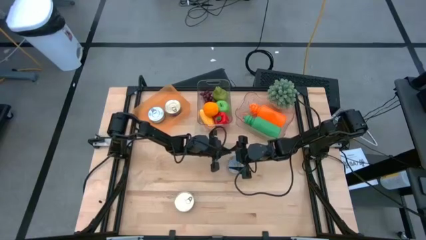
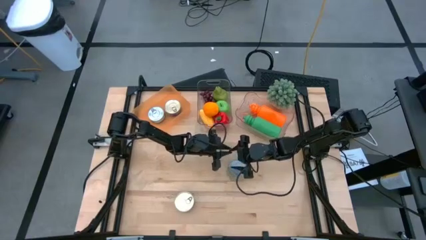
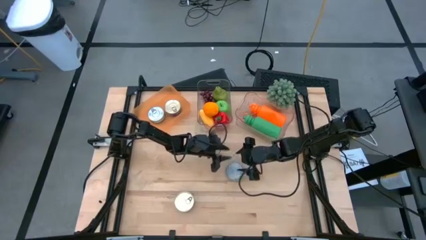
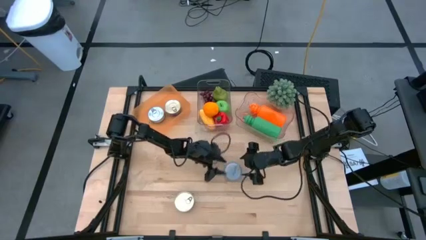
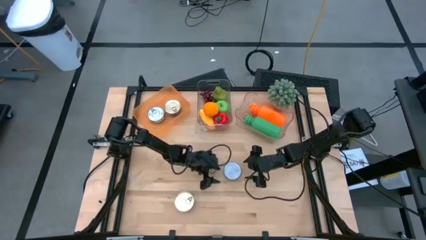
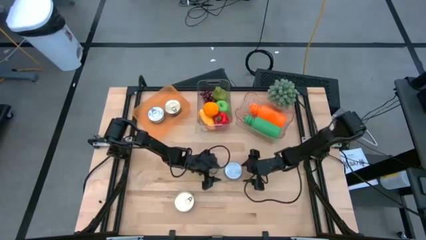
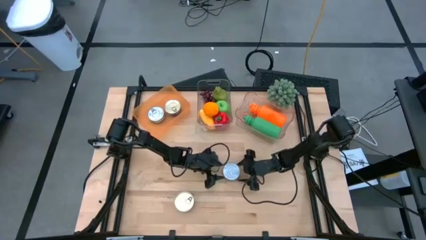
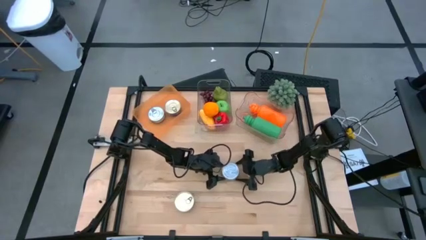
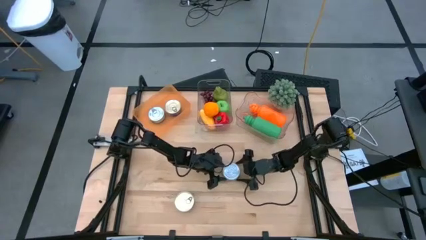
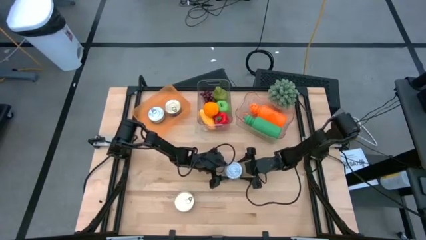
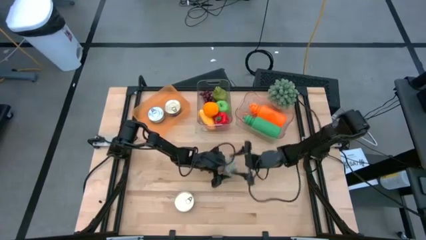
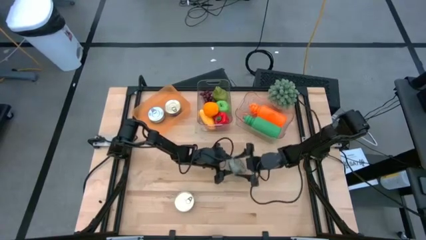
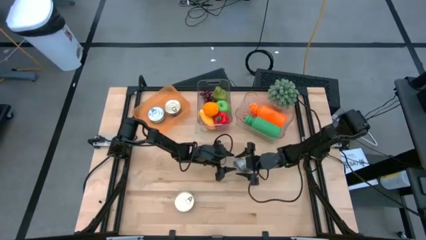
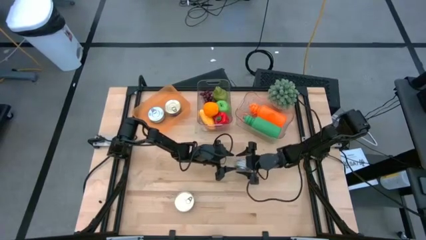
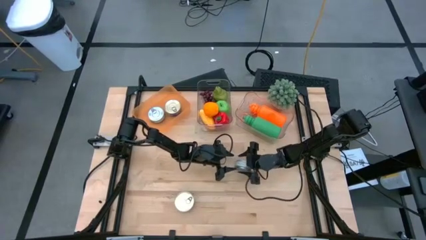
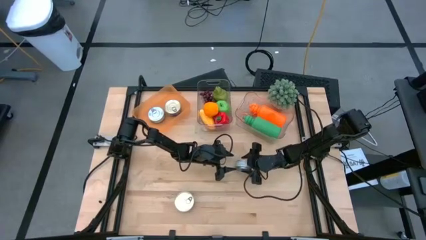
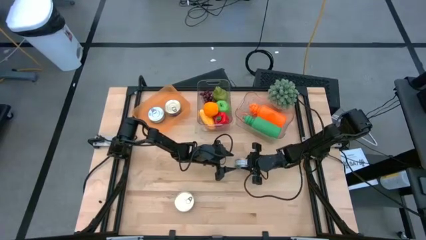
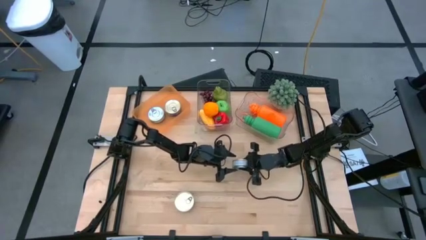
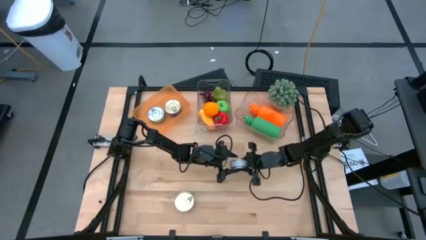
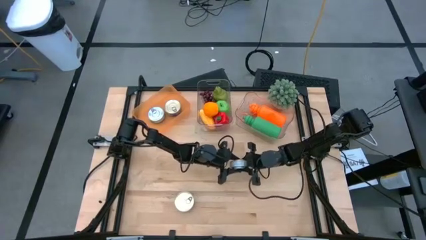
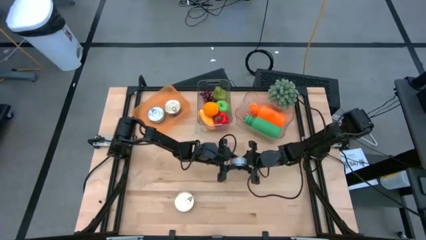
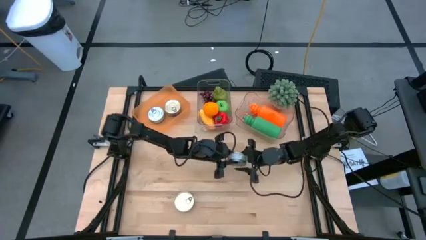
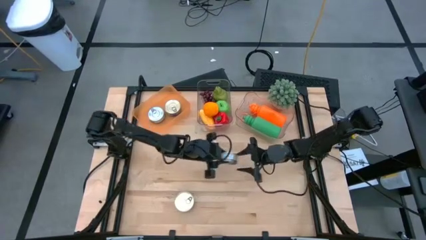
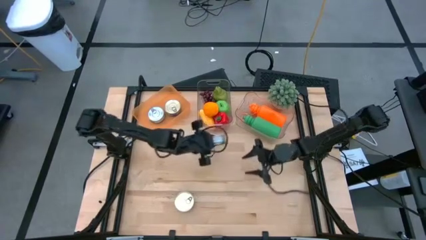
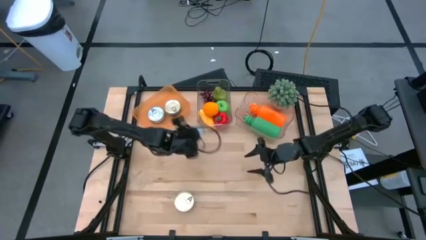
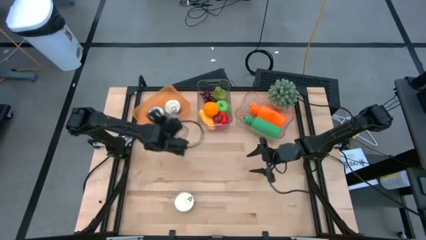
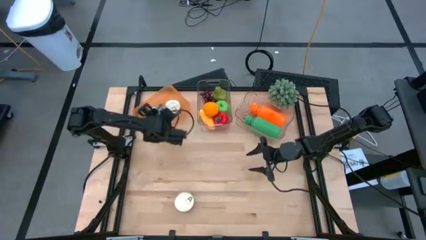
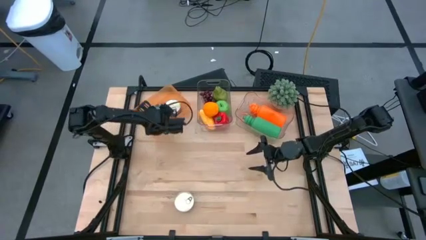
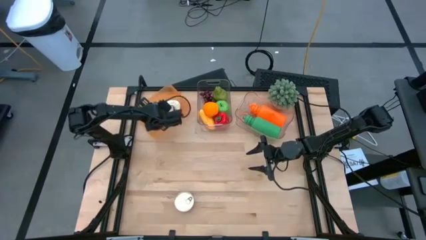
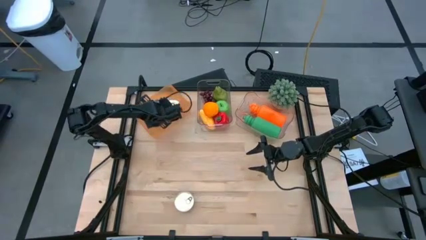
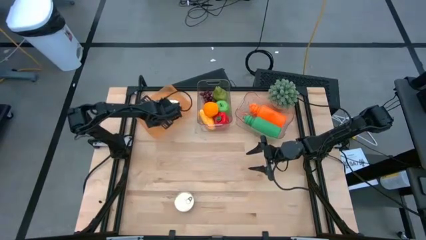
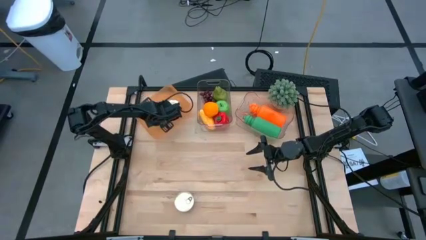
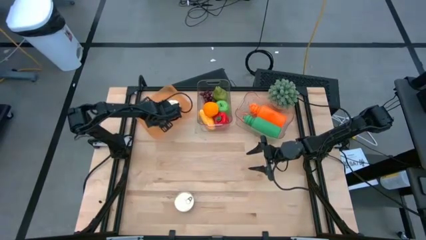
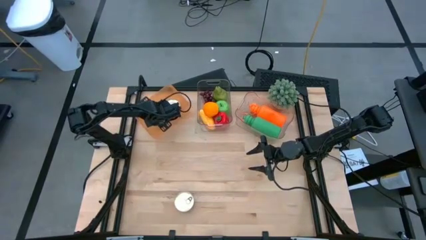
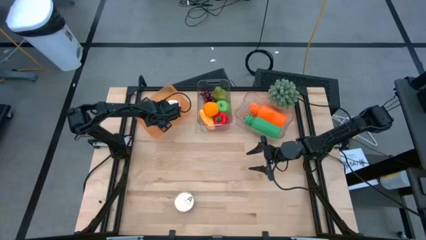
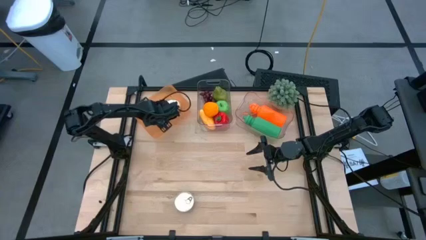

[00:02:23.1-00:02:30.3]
Task: Pick & Place Food Item
Put the green tuna can into the orange bin

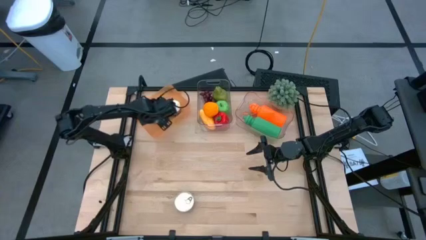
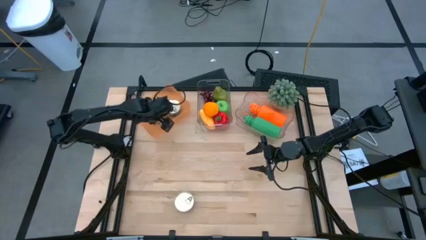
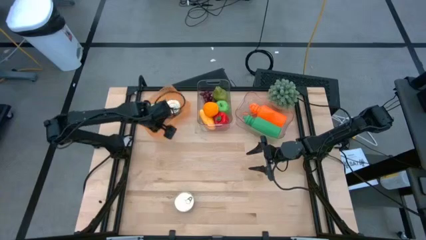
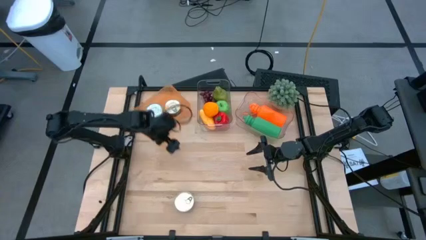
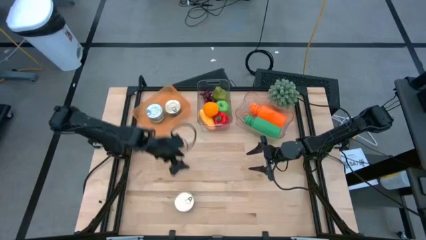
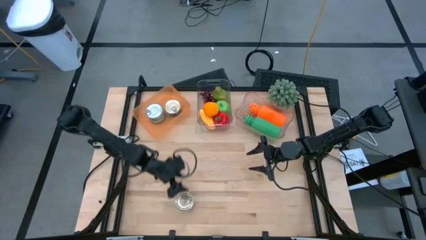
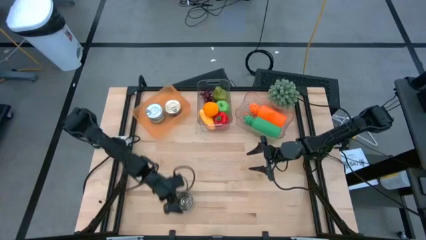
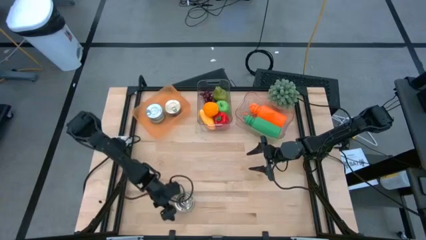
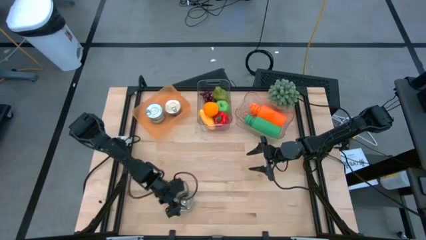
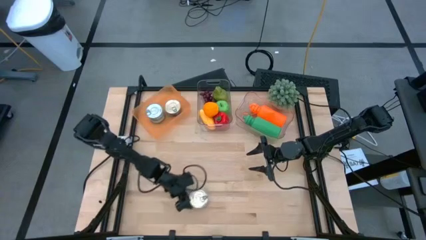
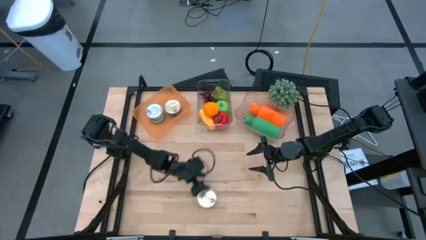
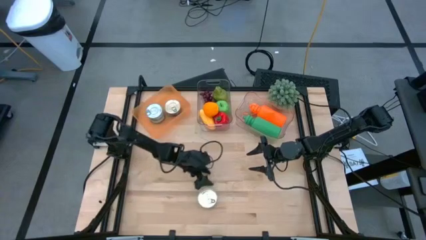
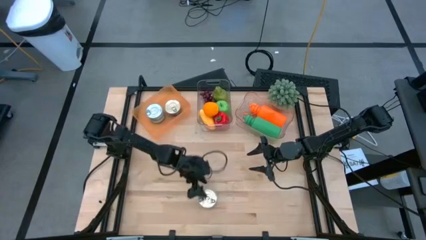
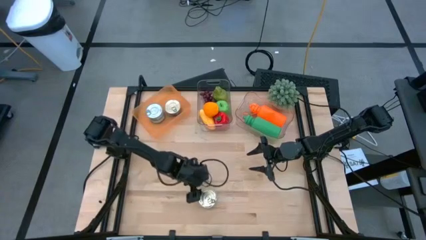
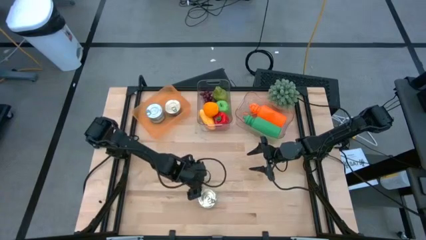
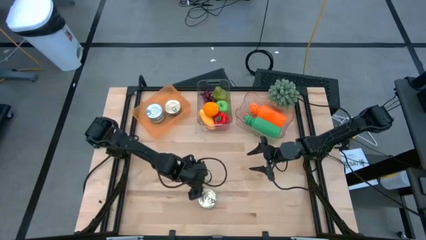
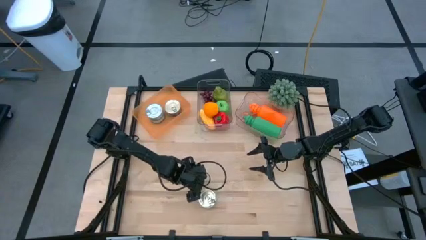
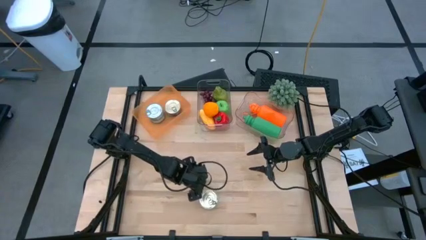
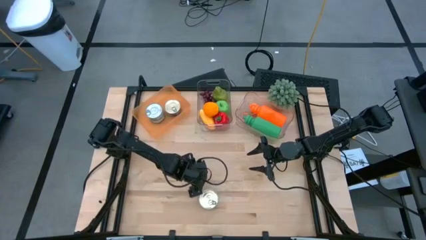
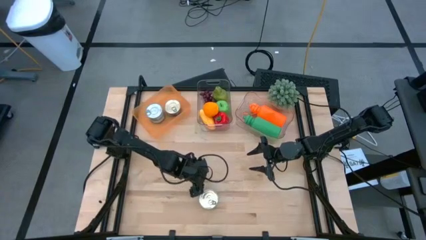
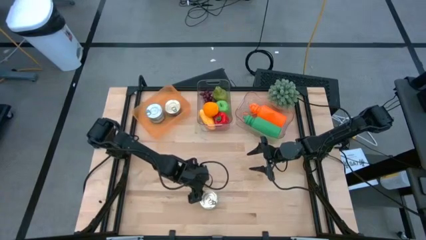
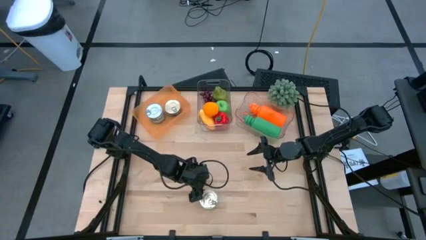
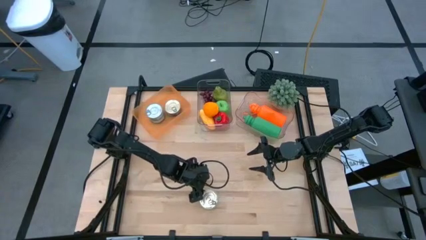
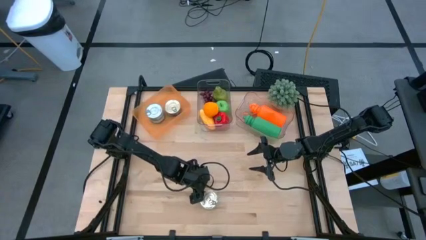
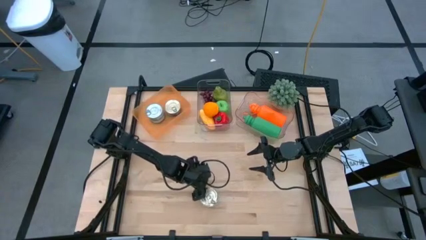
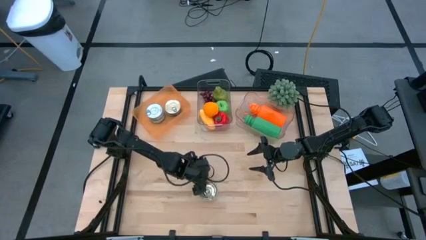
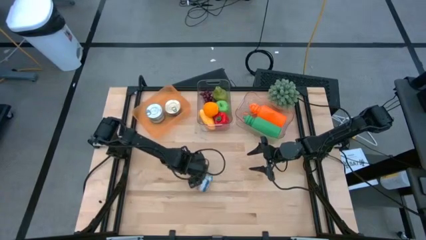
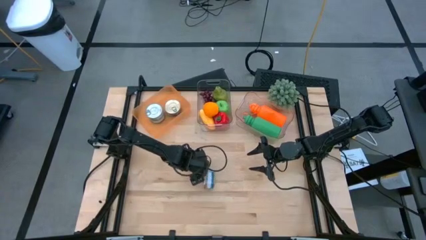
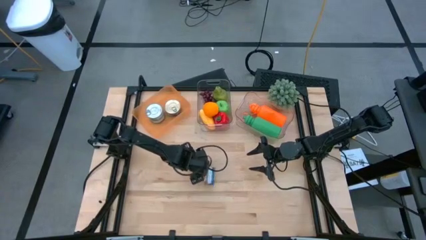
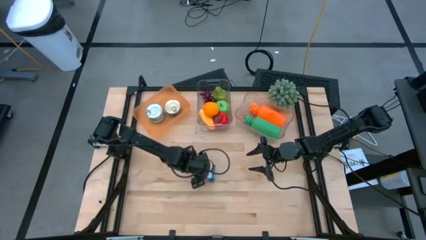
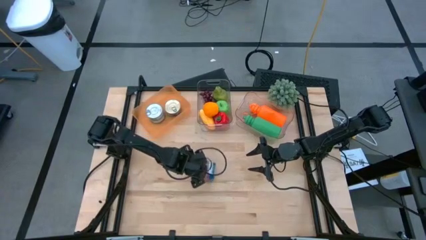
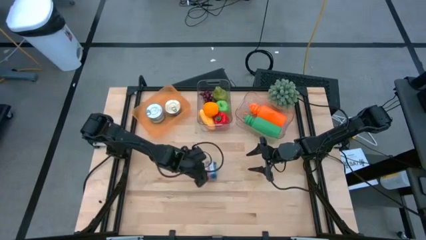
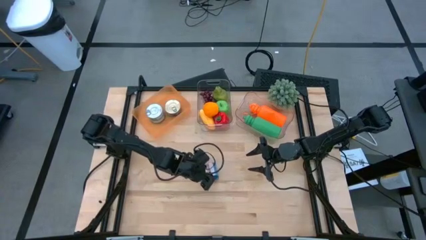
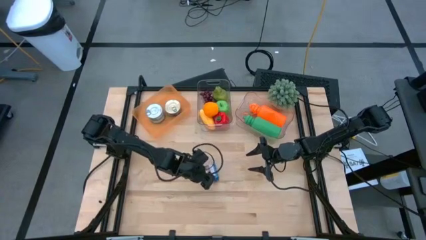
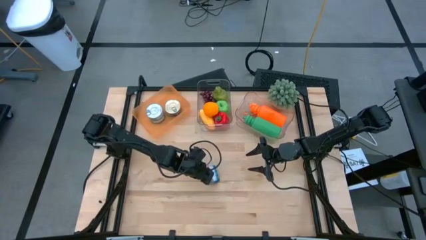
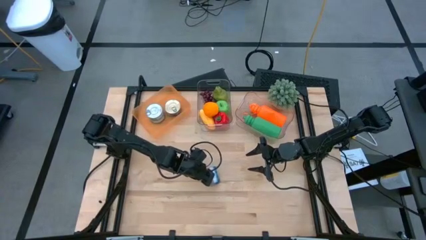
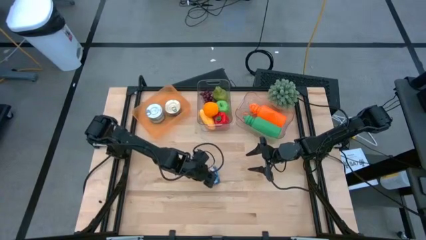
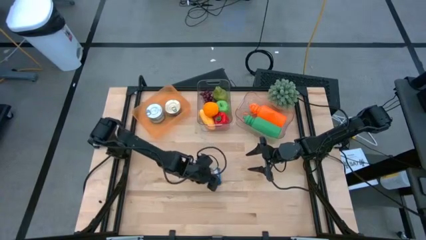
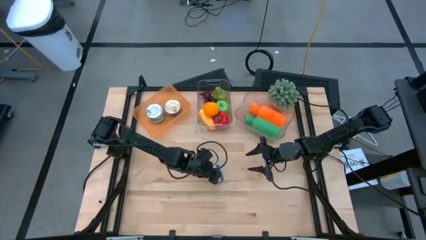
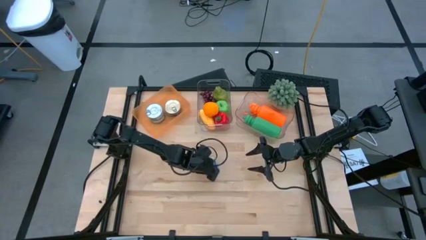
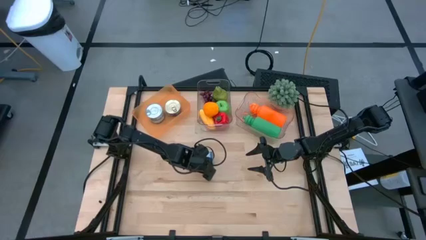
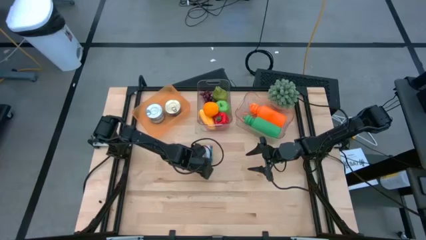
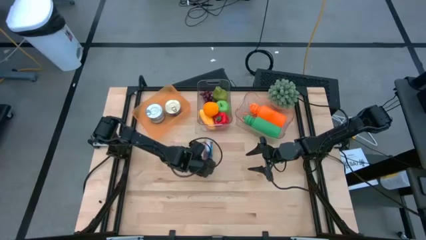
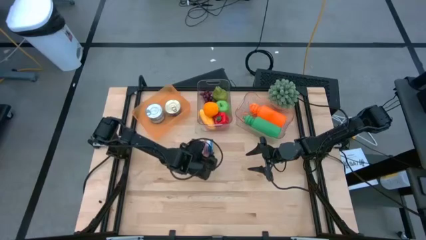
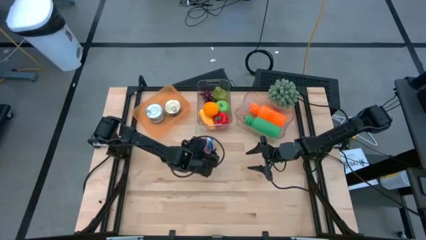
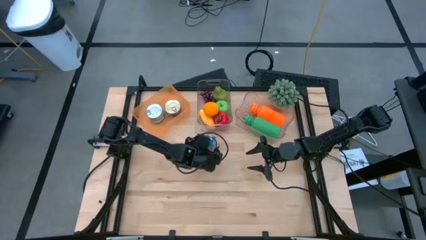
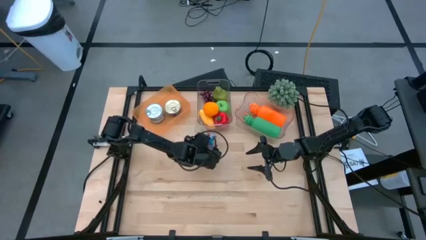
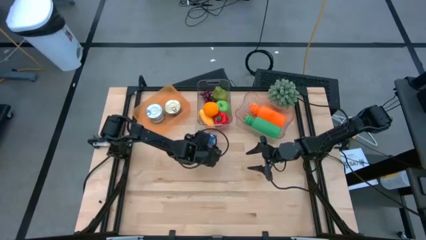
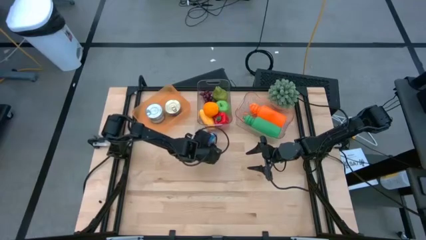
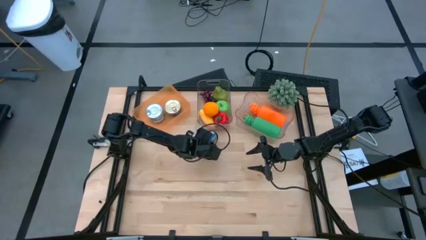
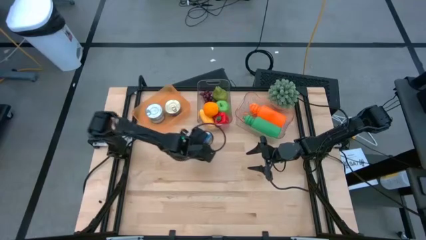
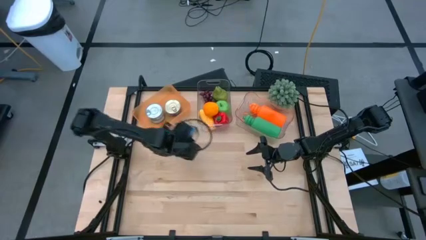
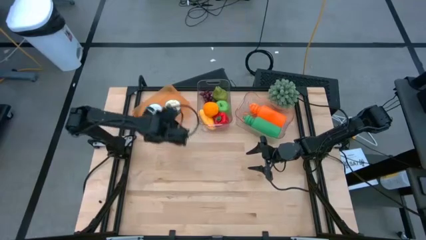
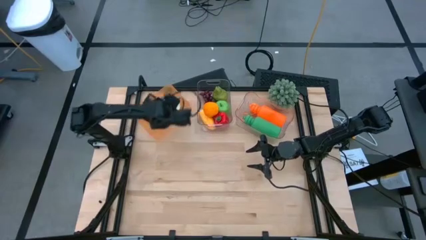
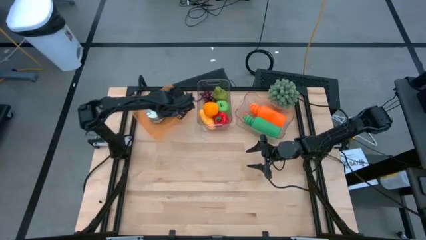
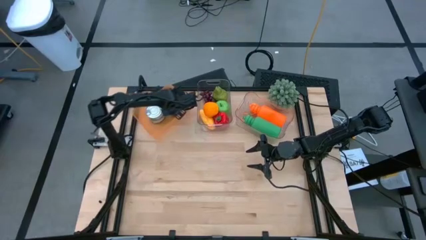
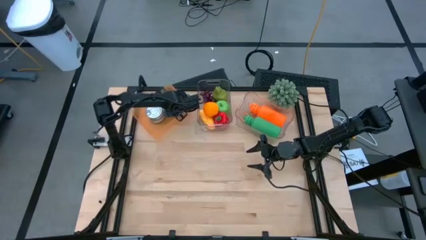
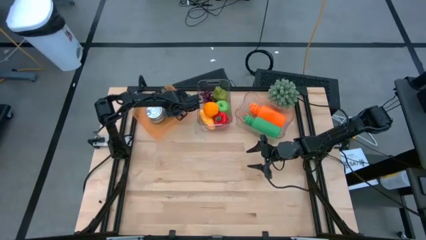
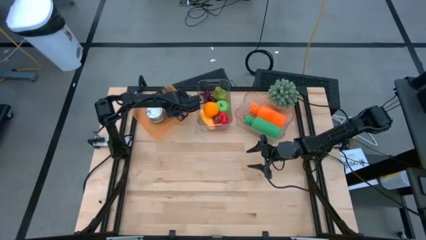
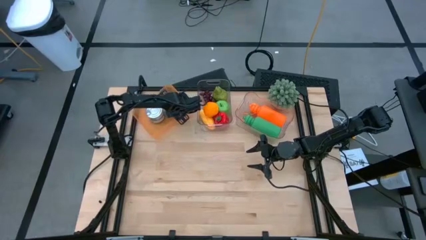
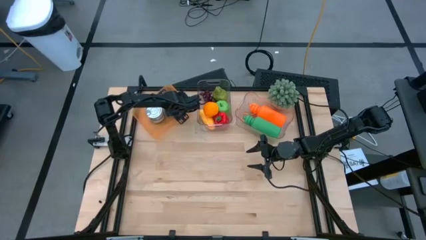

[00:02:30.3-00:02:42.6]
Put the blue tuna can into the orange bin
